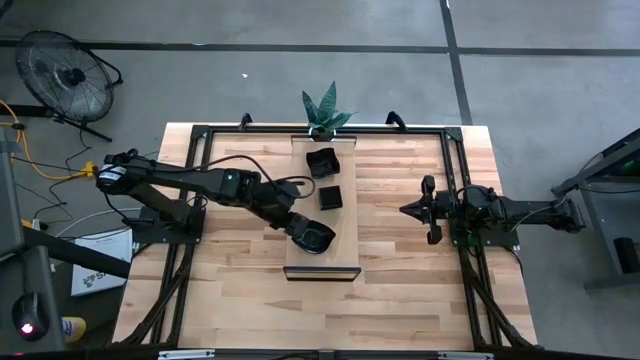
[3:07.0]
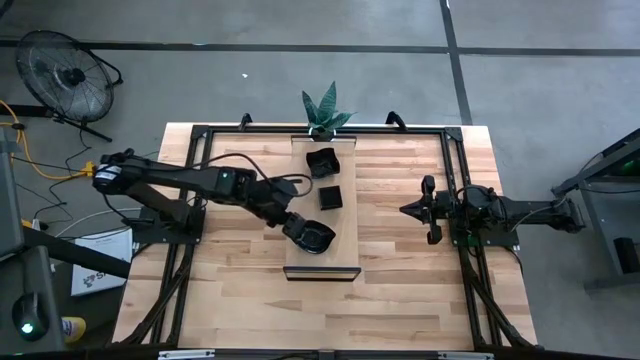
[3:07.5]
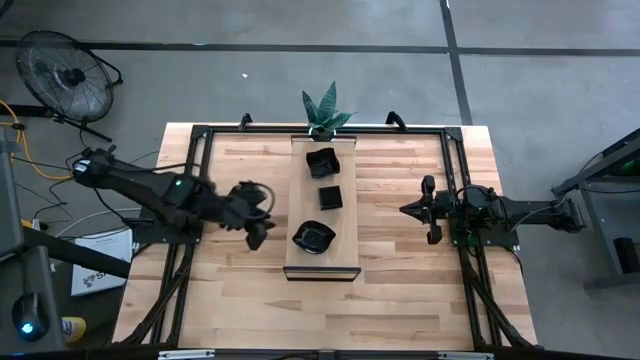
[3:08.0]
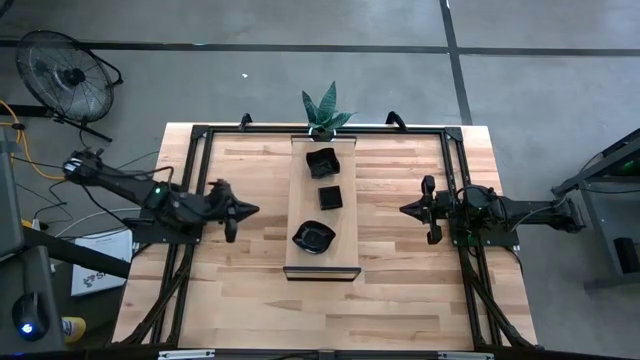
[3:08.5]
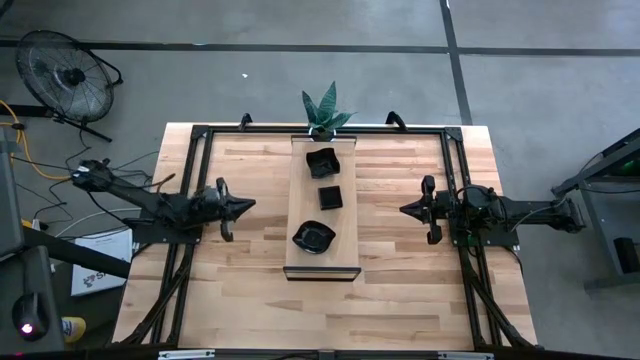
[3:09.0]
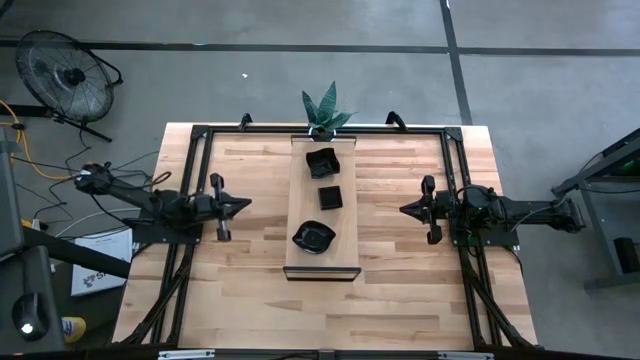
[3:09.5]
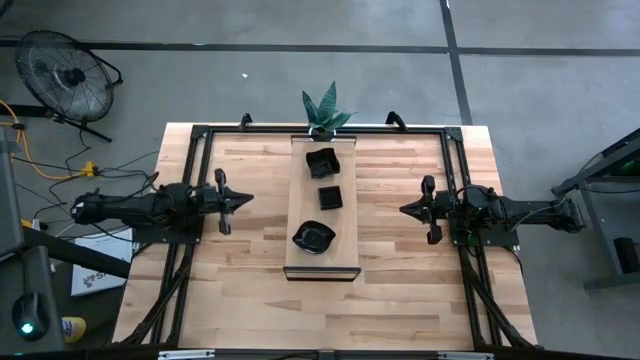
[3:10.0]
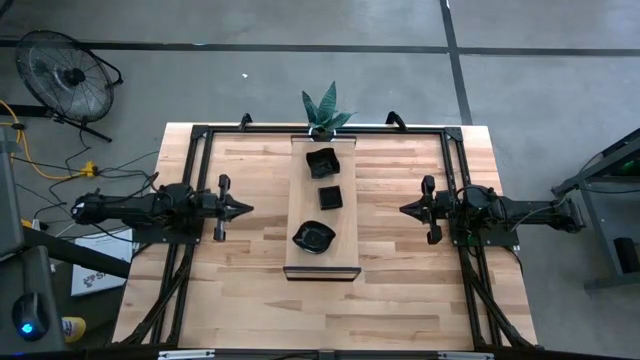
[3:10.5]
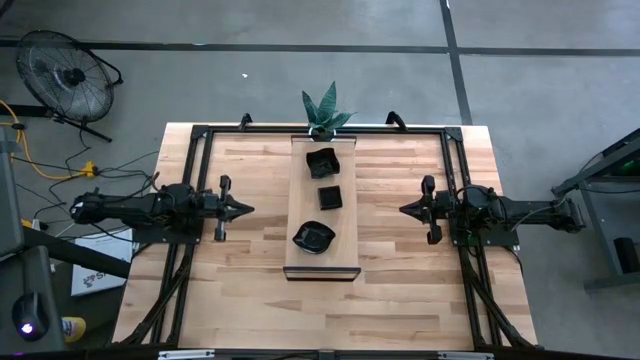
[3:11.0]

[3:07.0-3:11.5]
Task: Pick & Place Mini shaped plates
Return to Home Position

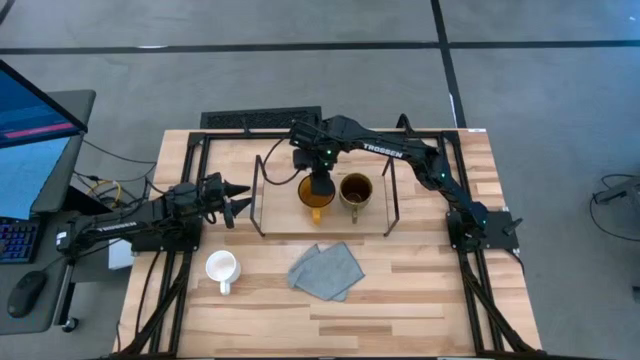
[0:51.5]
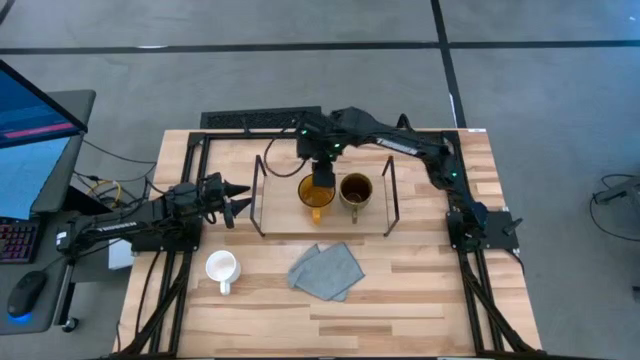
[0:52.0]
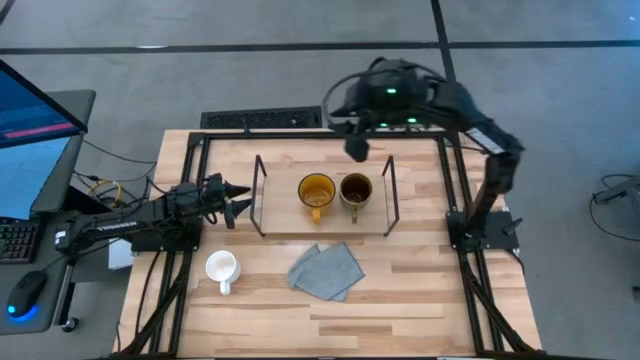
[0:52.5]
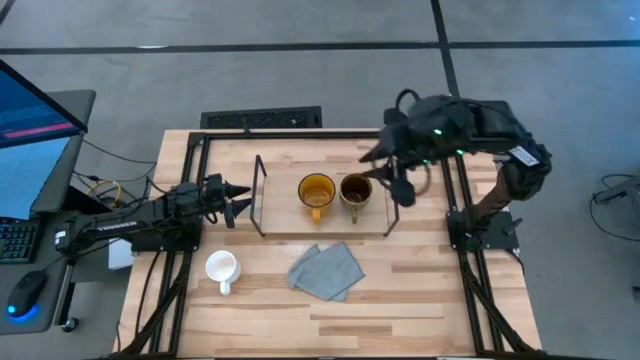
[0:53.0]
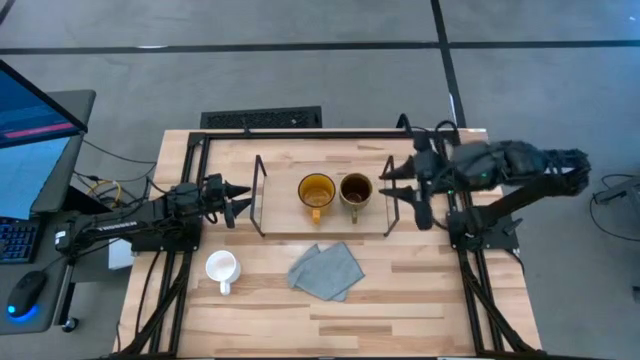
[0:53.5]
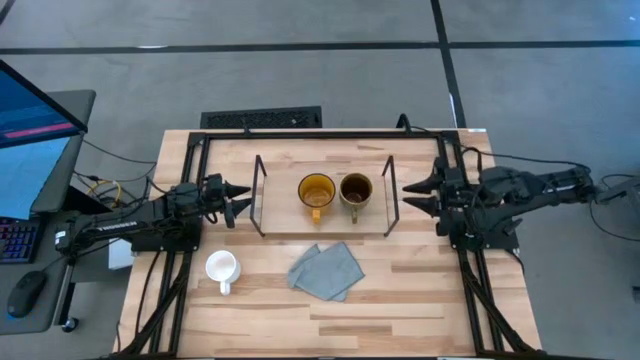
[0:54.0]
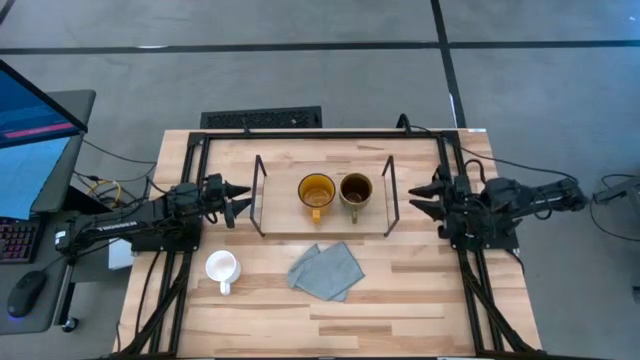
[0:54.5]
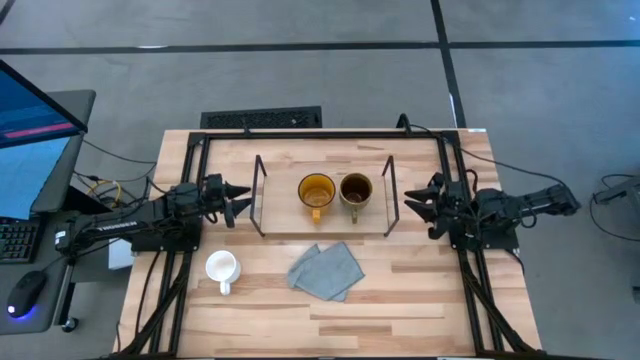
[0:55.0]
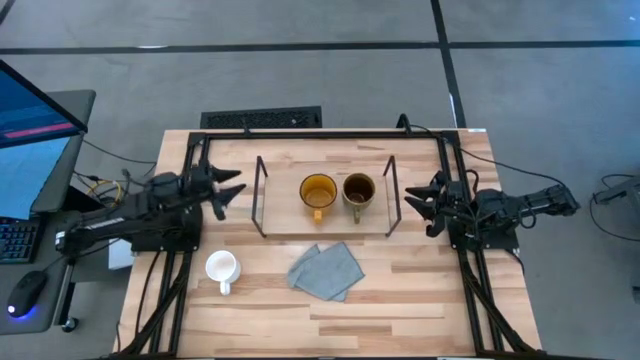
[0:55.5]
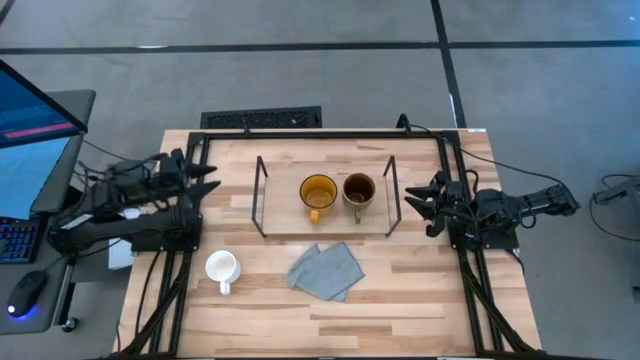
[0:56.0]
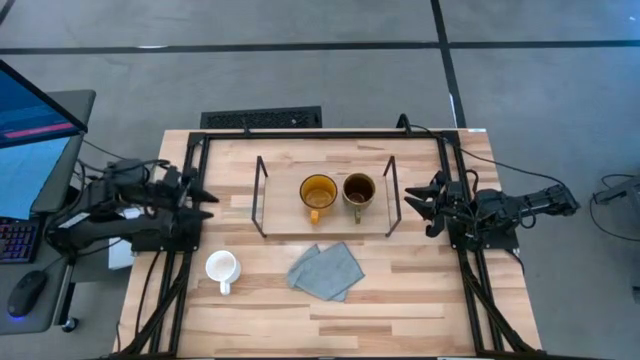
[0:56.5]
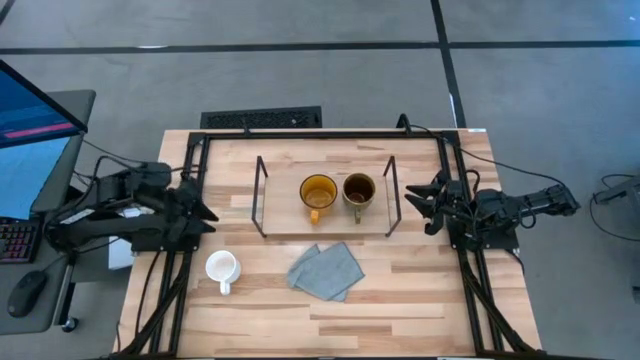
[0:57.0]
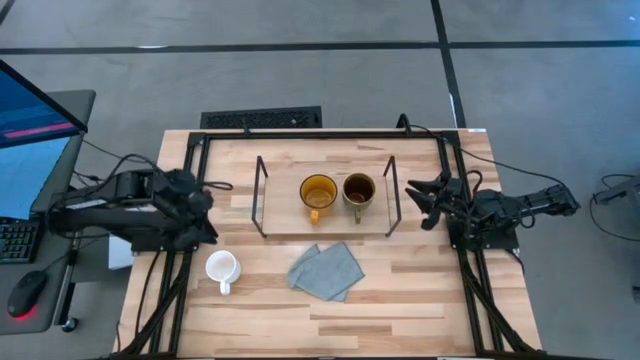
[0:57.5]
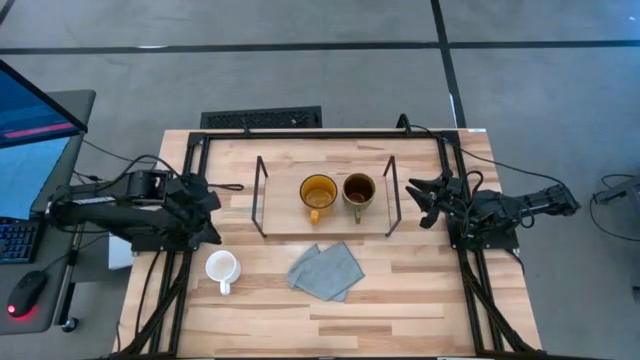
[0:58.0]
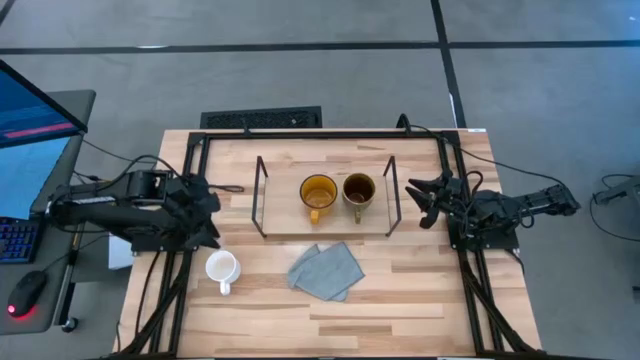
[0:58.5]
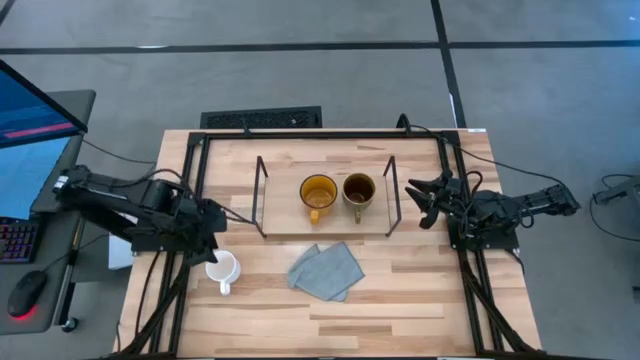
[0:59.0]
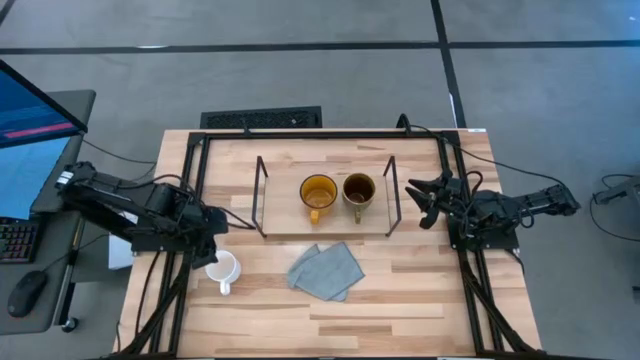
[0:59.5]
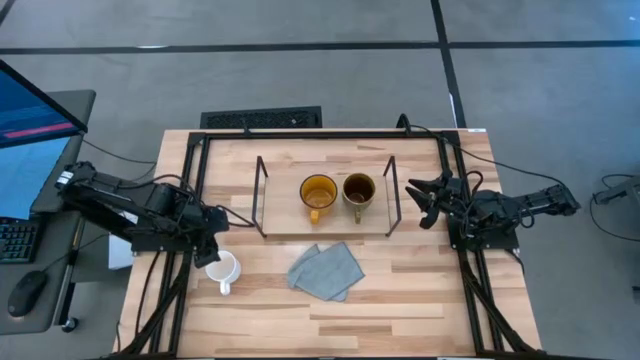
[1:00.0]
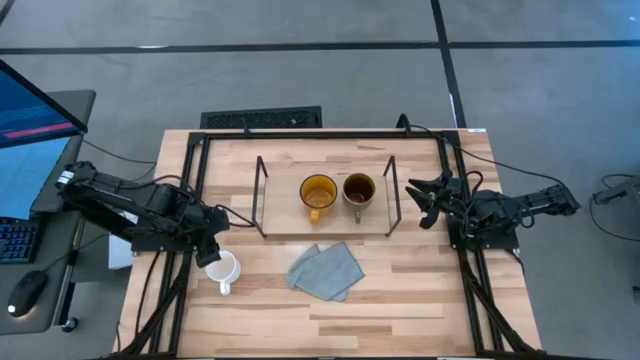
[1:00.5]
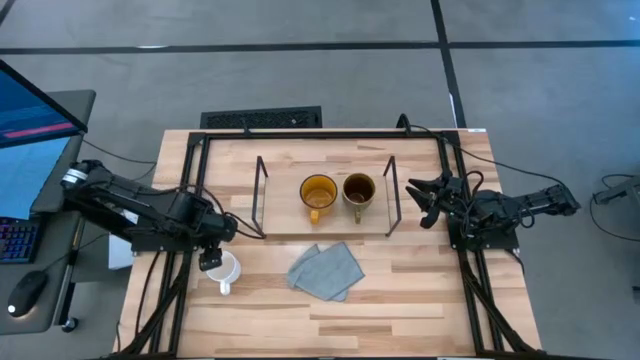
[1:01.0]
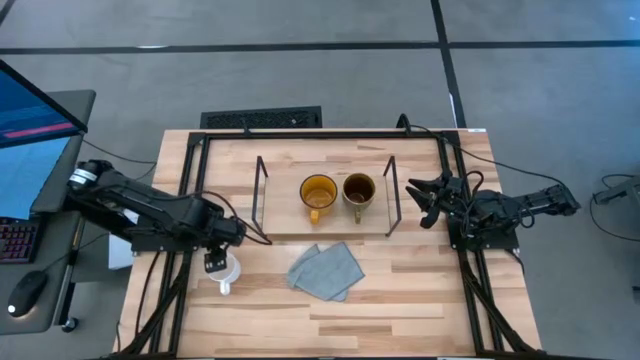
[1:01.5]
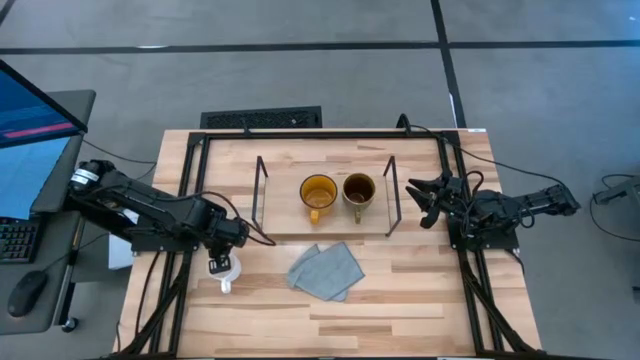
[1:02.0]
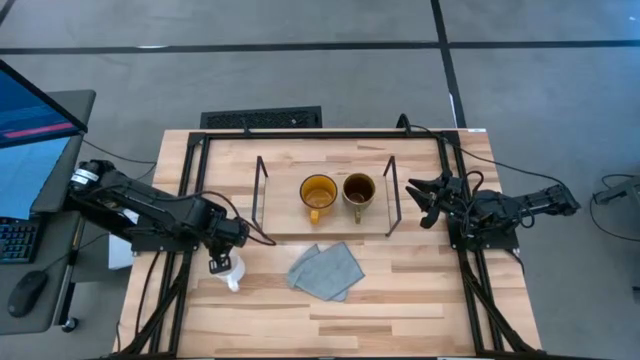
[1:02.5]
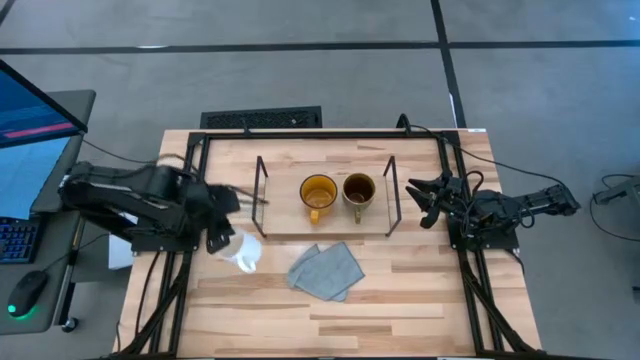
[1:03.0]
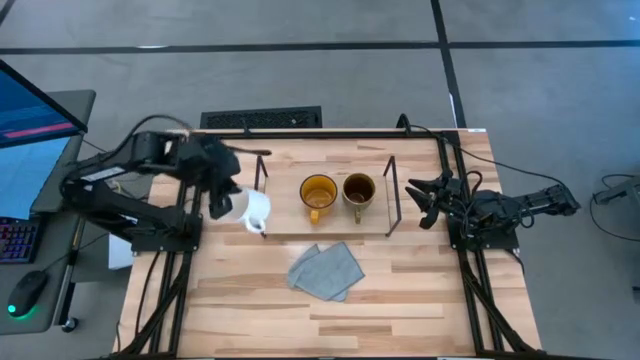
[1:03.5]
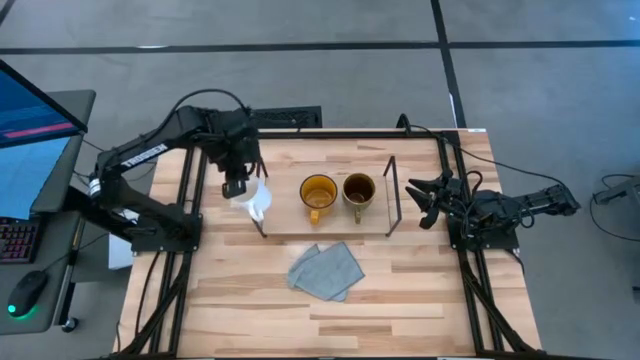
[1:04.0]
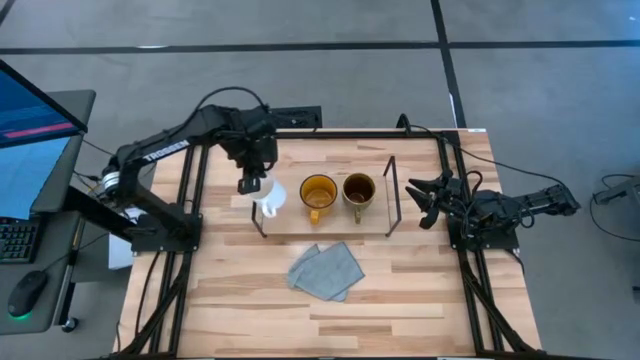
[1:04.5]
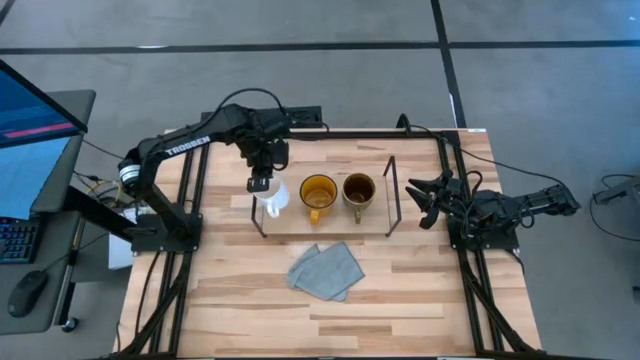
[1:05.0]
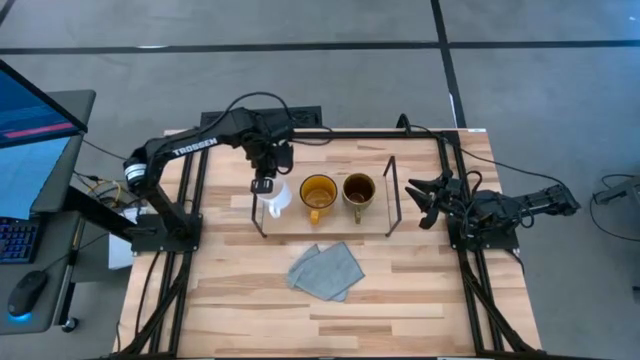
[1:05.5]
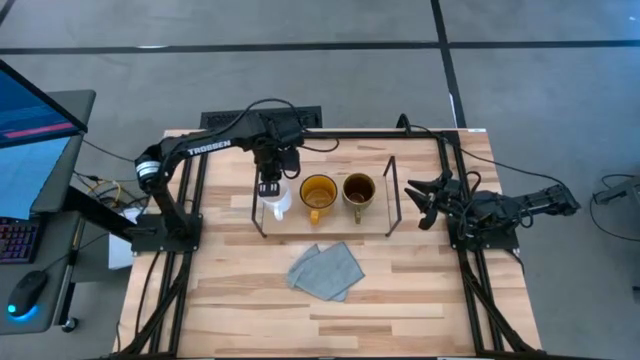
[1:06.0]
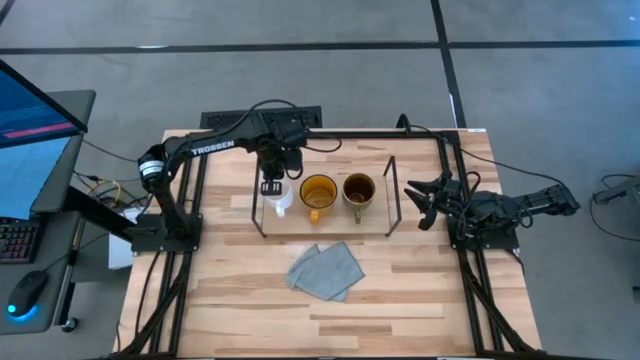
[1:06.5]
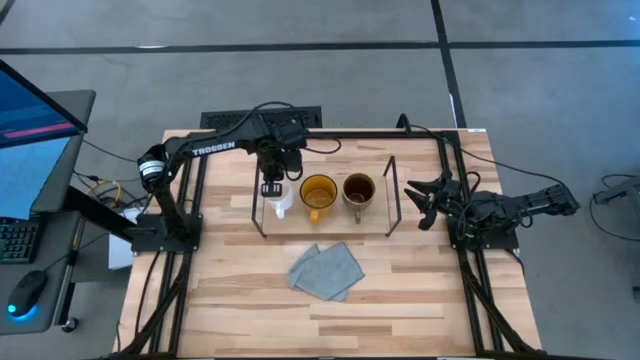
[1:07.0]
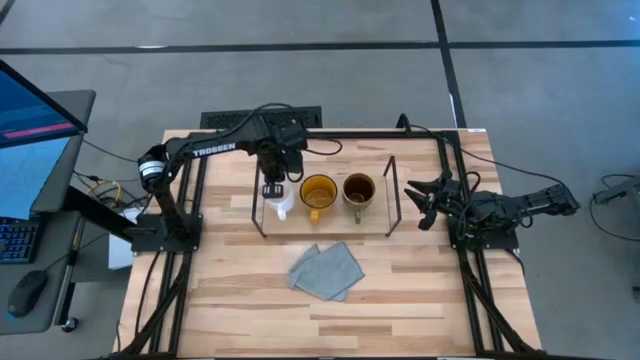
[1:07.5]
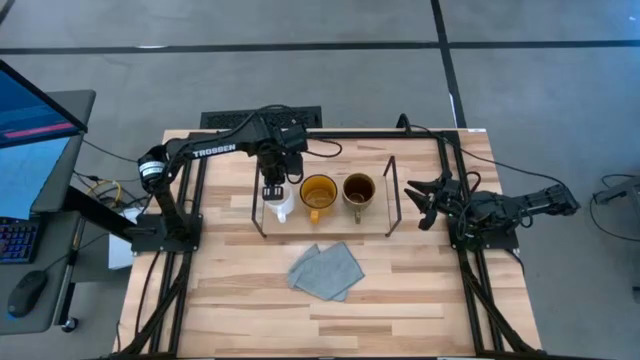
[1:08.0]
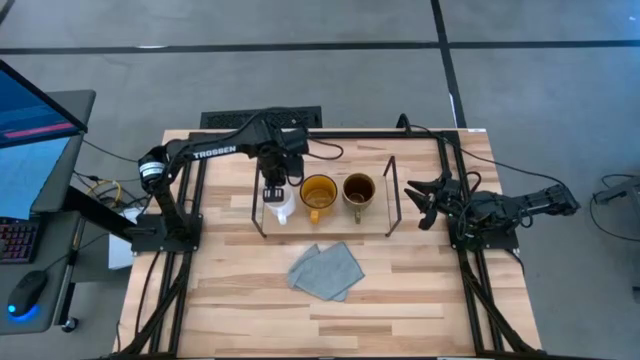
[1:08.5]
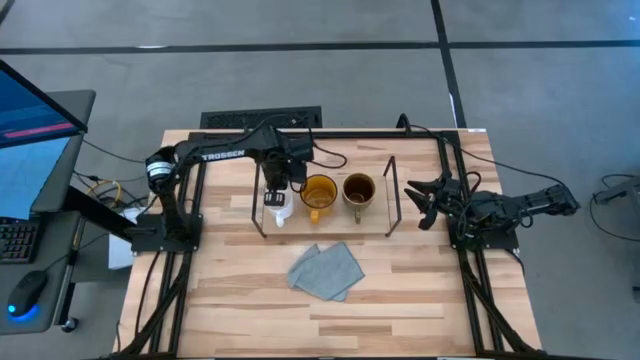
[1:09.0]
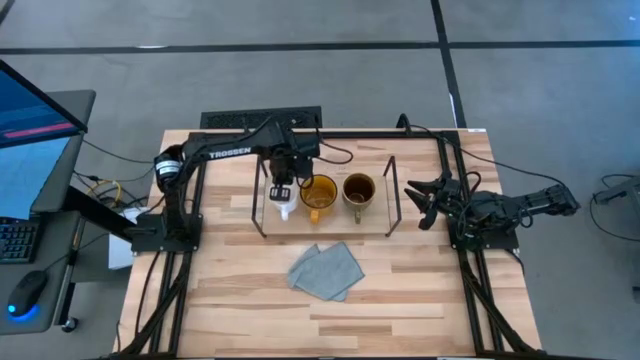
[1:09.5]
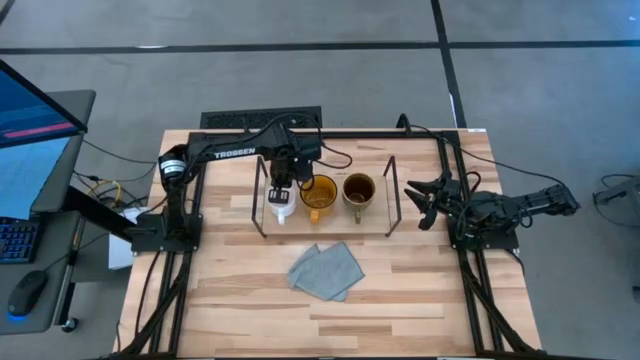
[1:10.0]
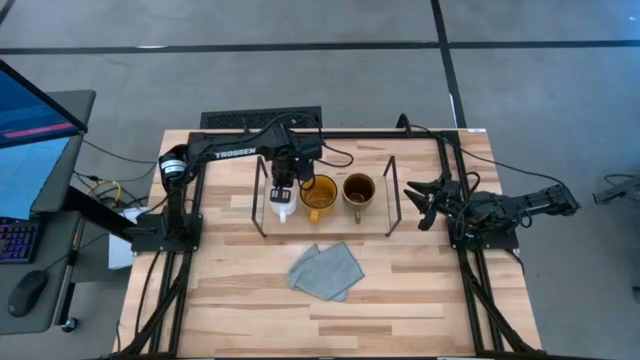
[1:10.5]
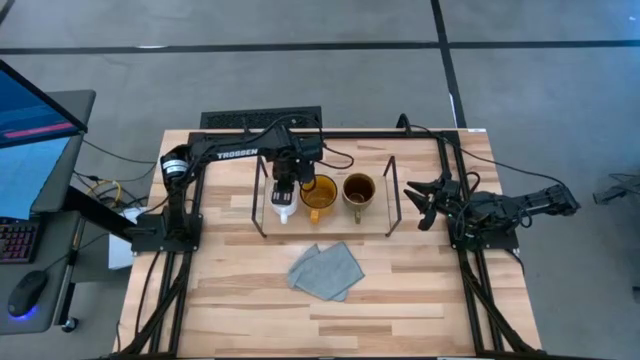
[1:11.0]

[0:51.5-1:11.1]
Task: Stack small to large cups/mugs on shelf
Put the white mug on the shelf
